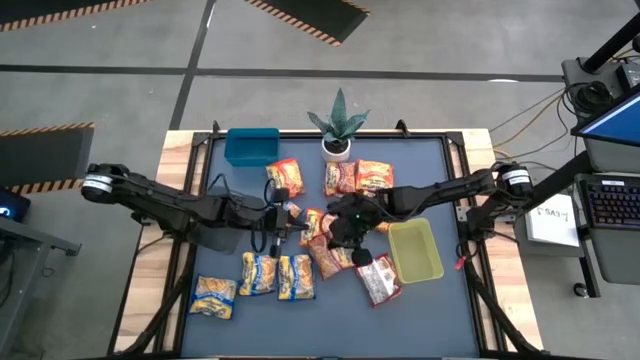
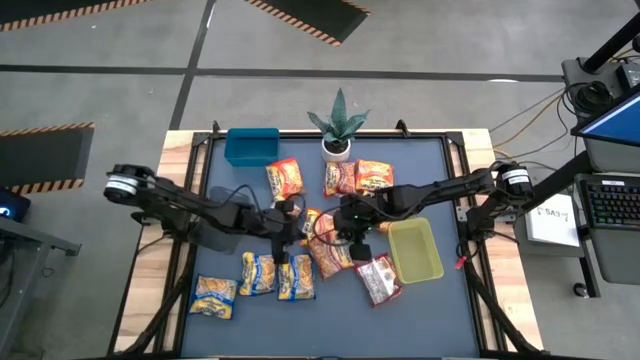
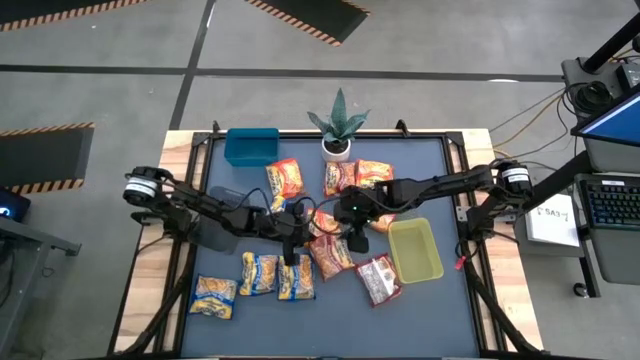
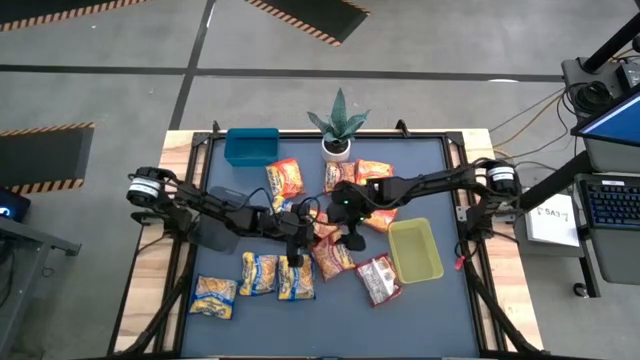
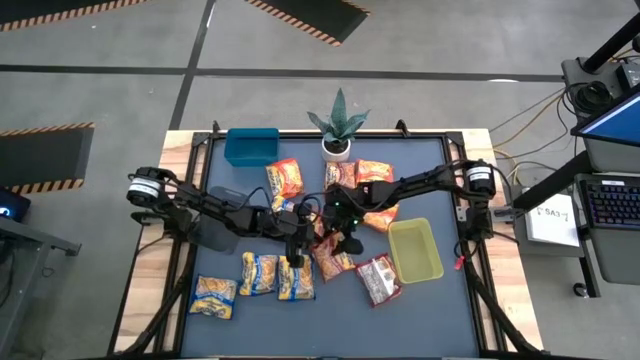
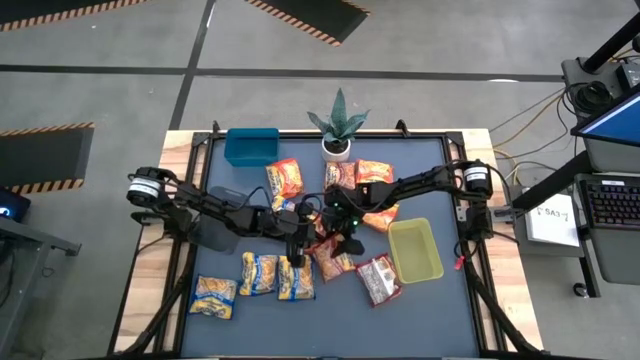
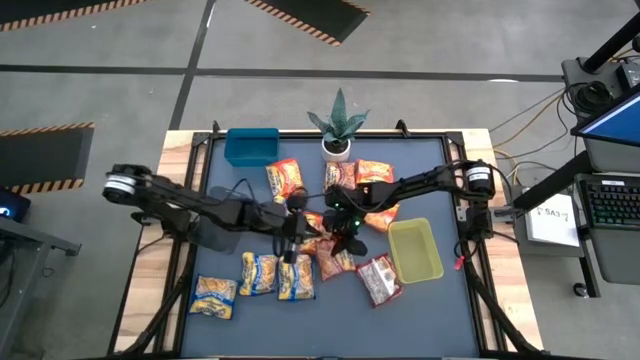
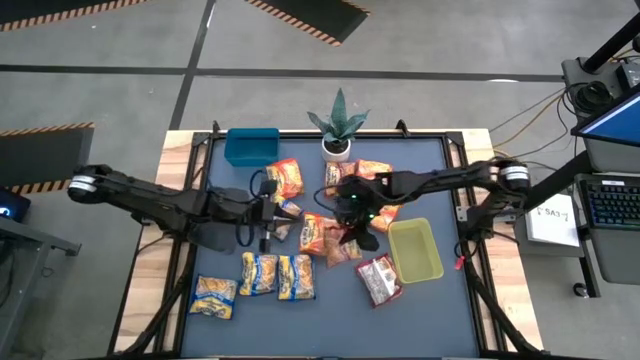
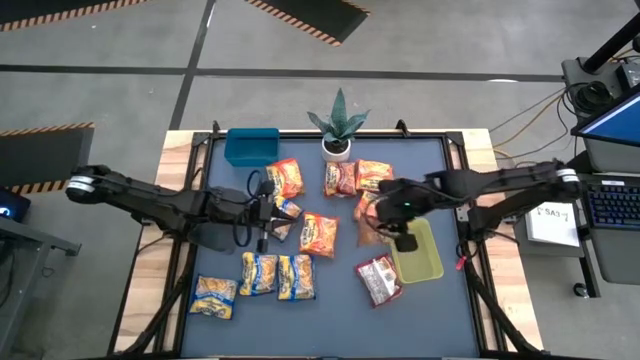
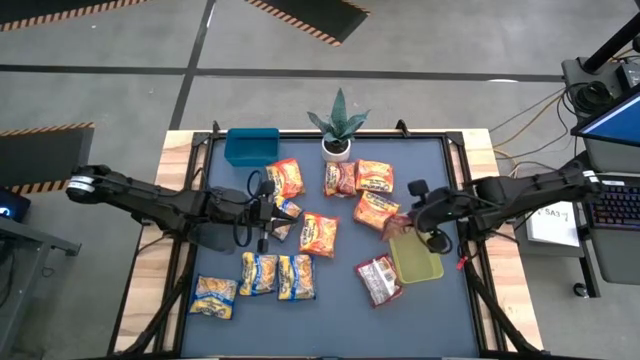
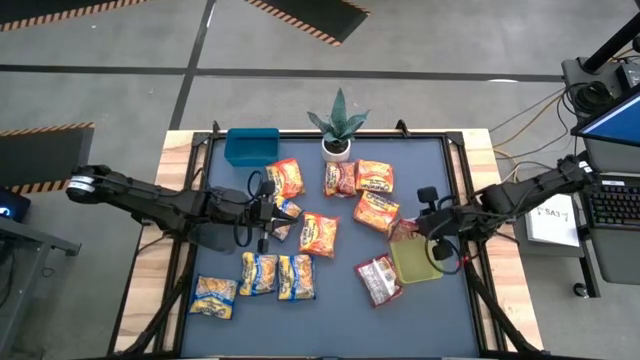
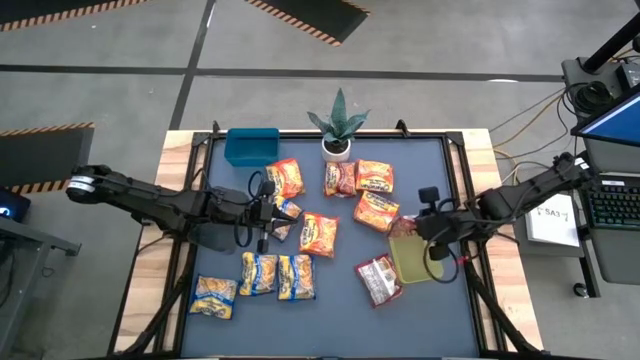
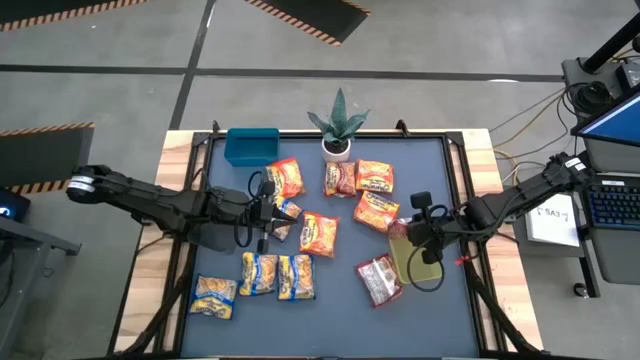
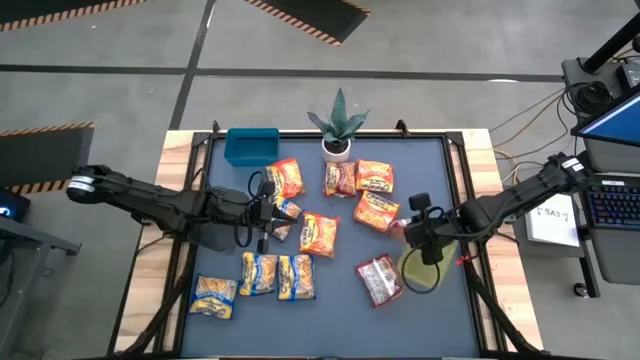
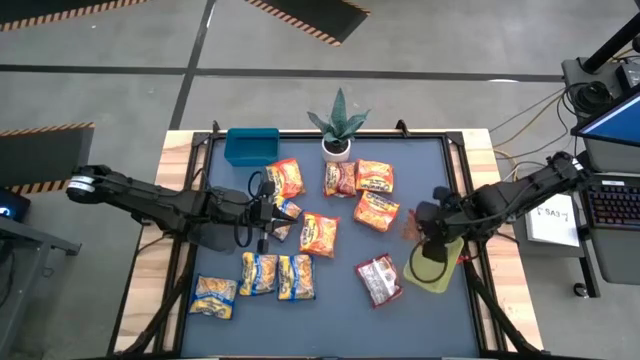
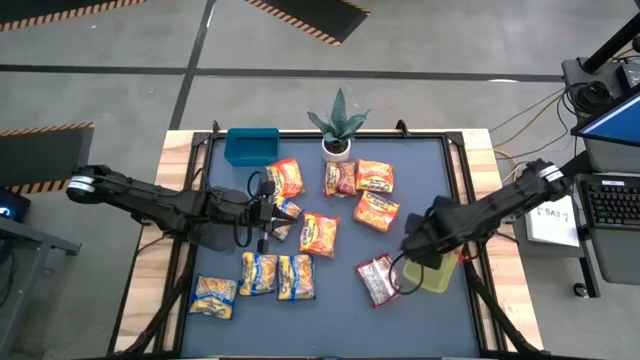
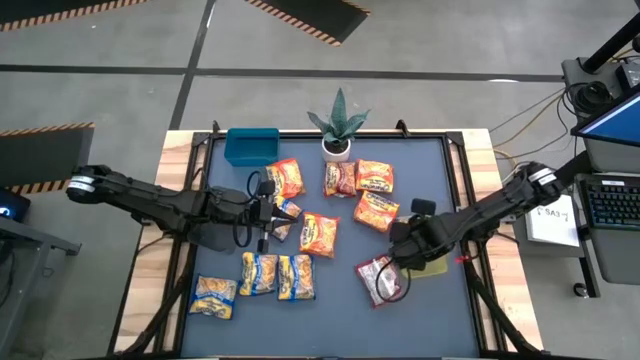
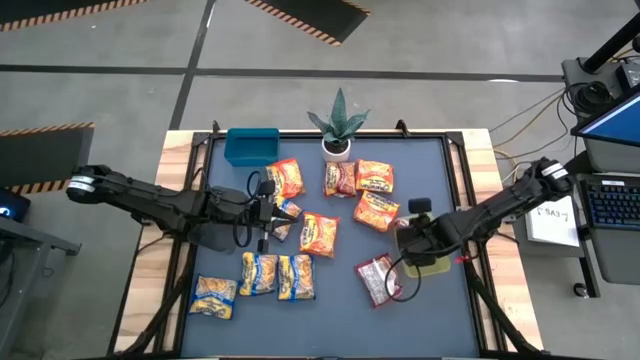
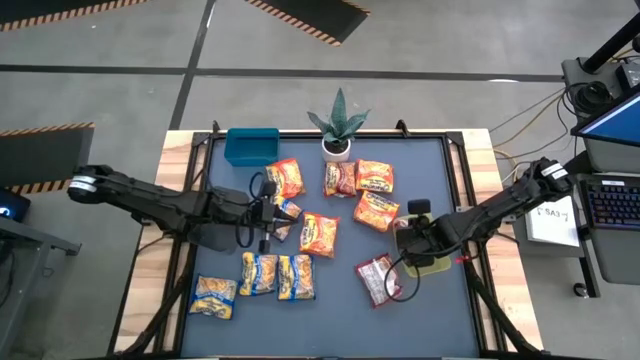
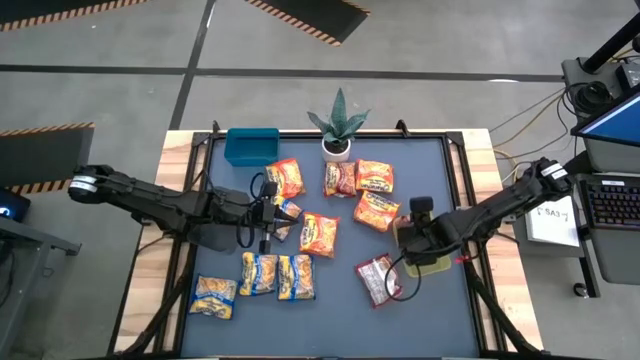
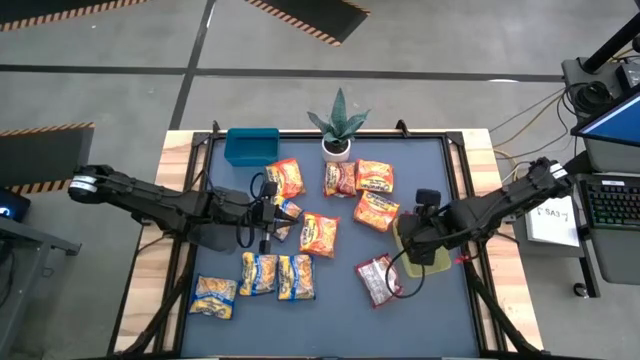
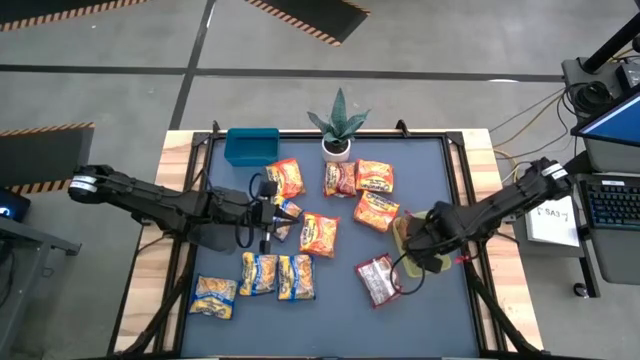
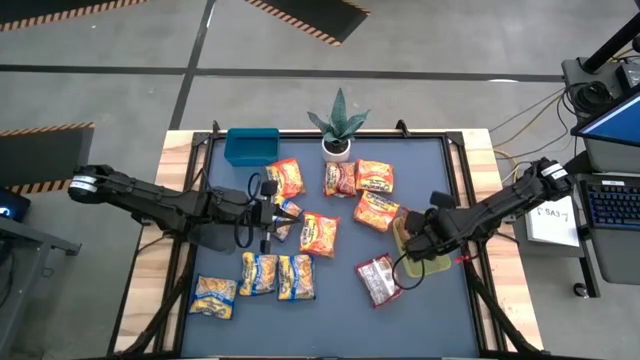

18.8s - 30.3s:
Task: Sort Maruchan noodles
Put the red noodle pack into the yellow bin

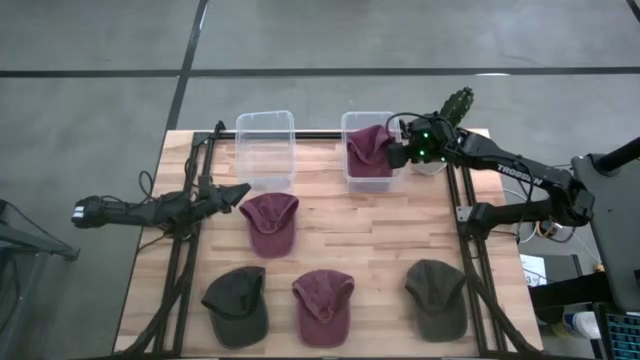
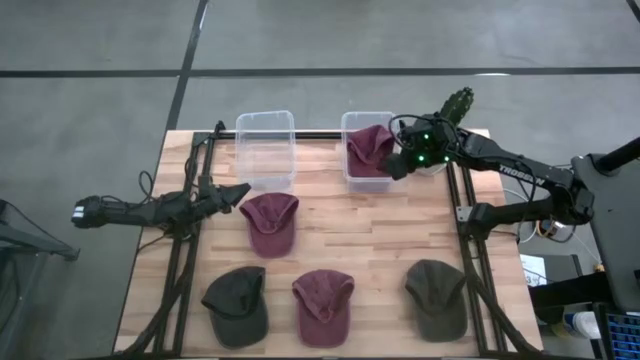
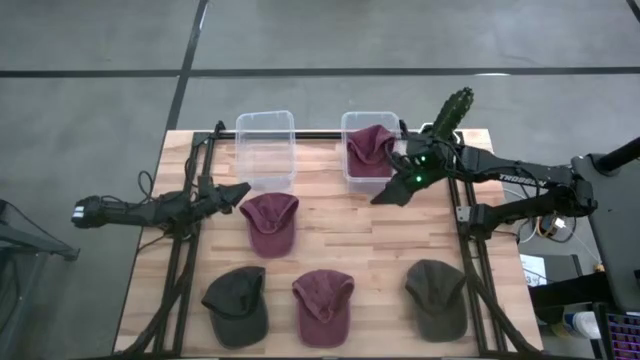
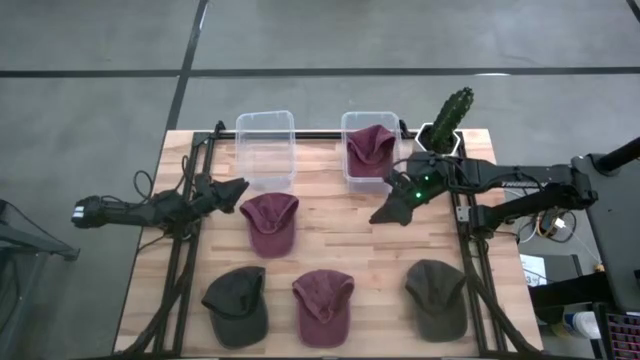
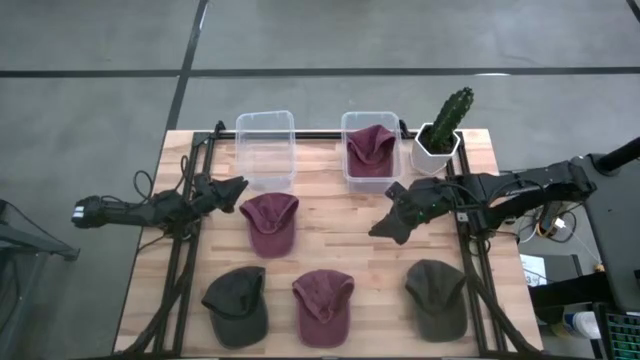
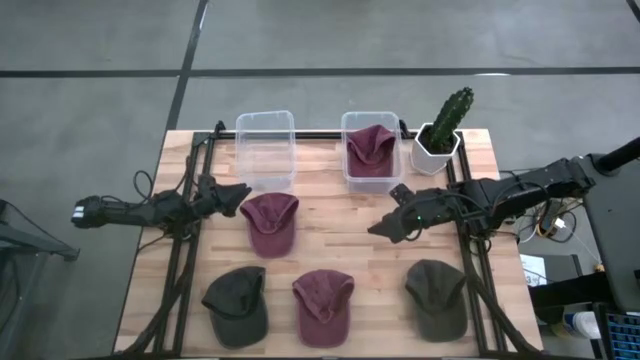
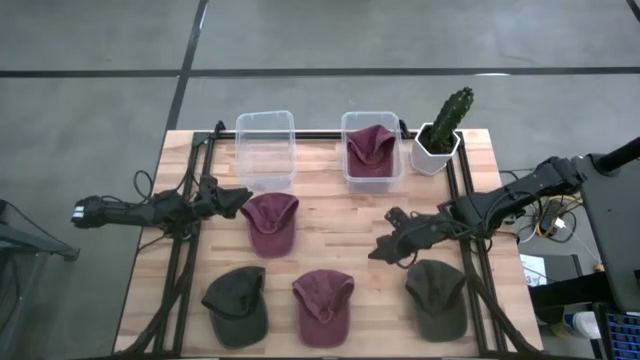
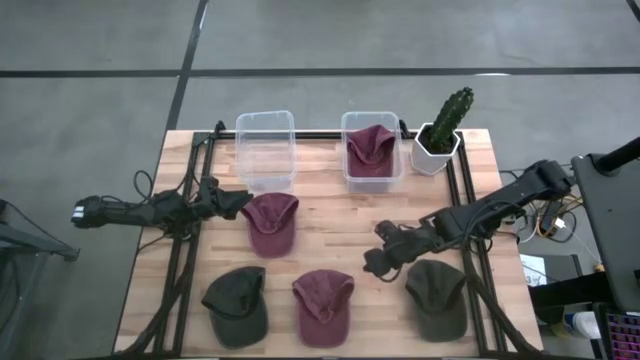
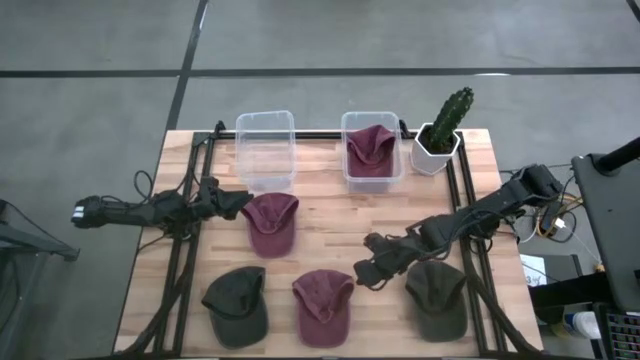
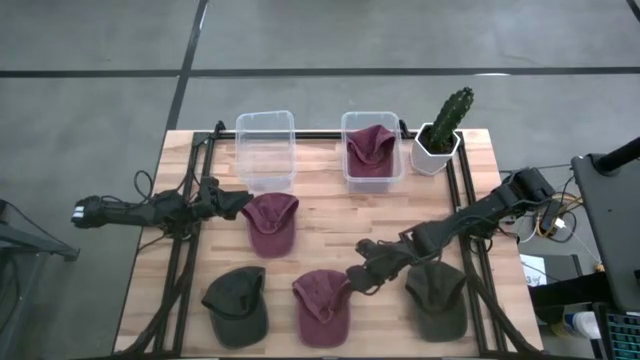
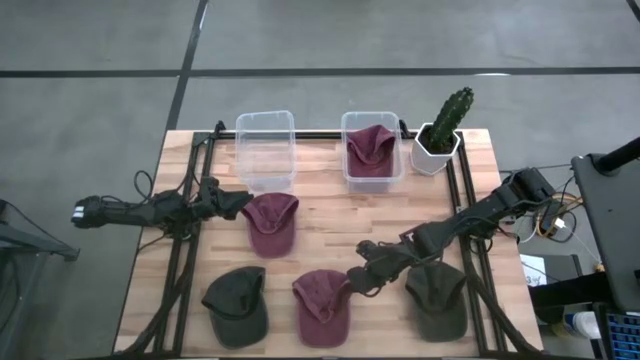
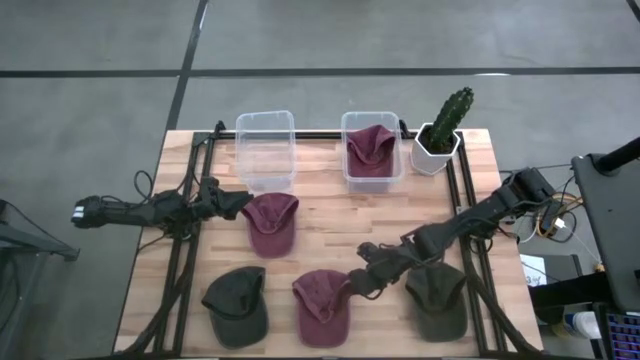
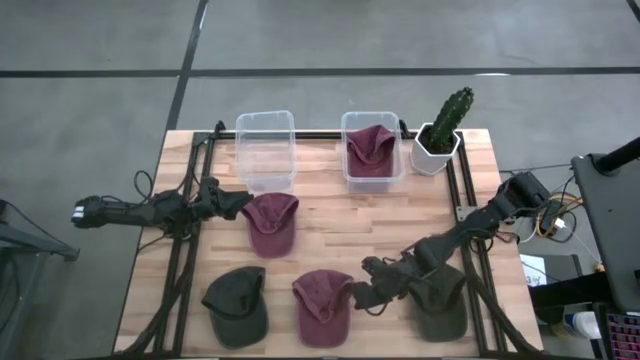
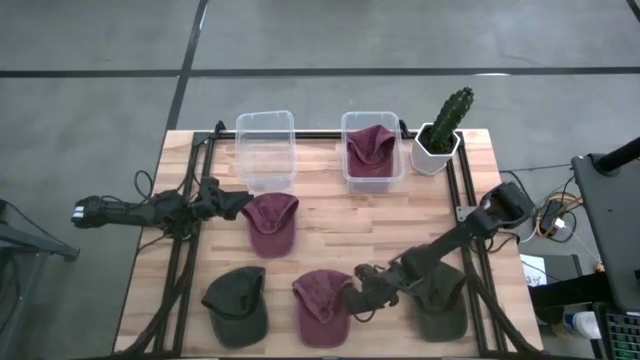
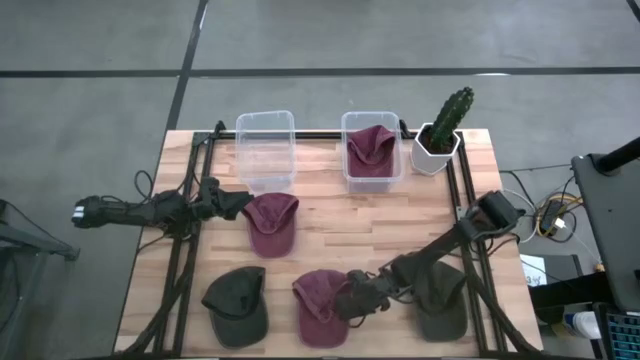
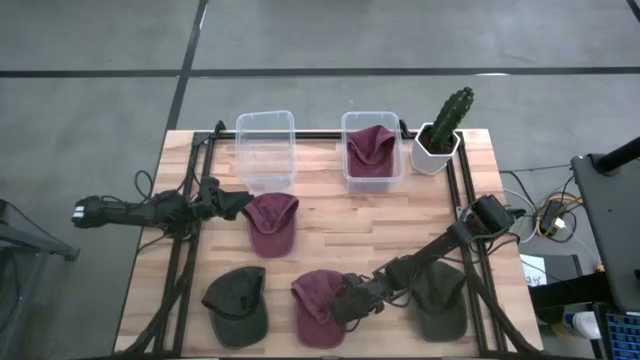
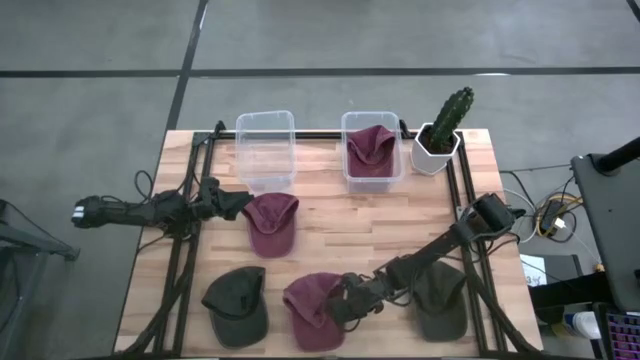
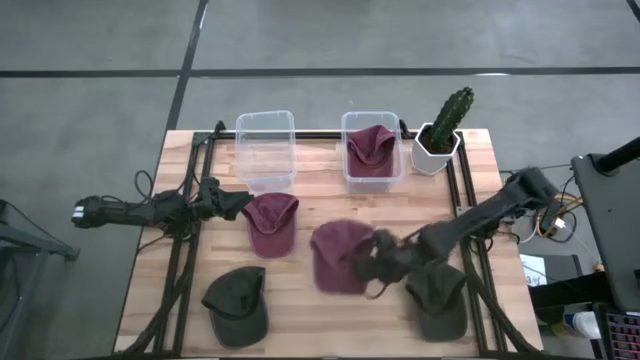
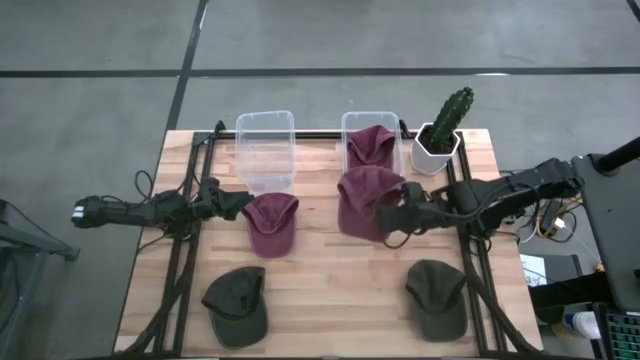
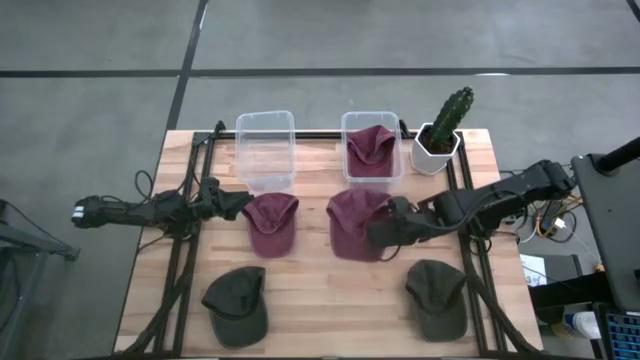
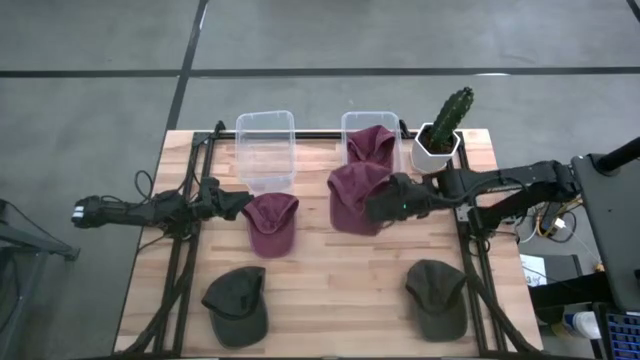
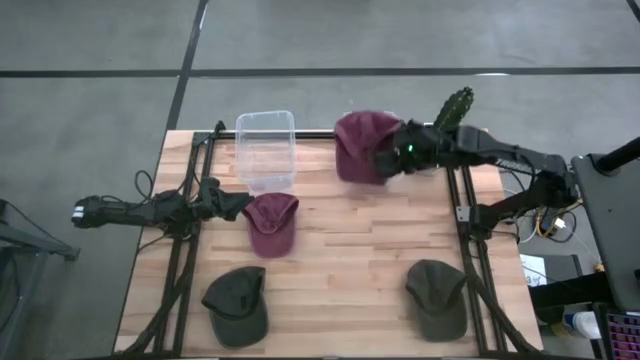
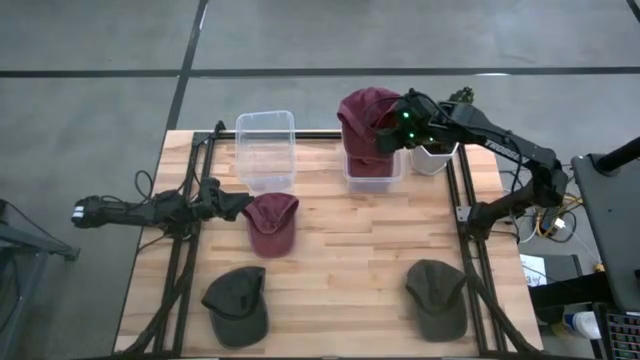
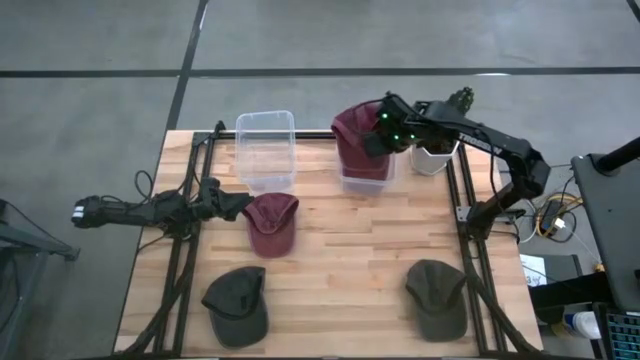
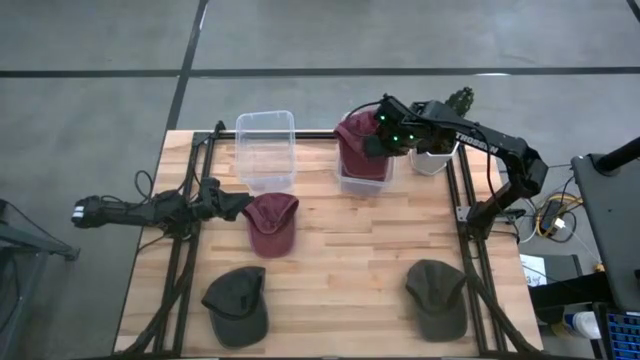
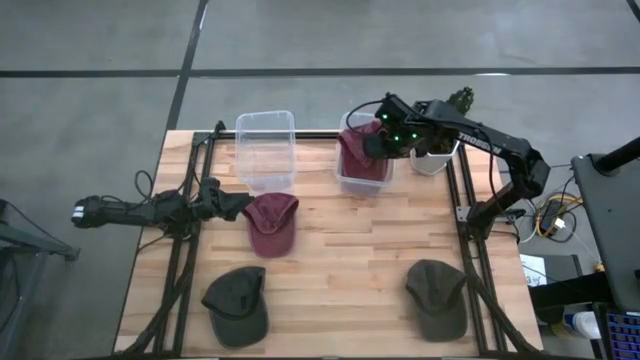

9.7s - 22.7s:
Task: Pick & Place hat
Put the bottom red cap into the right transparent bin
